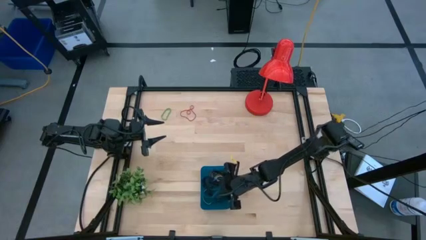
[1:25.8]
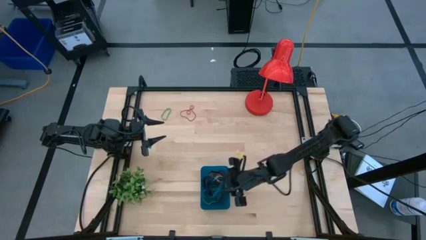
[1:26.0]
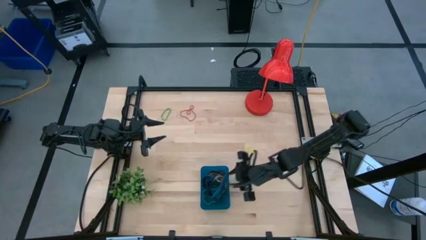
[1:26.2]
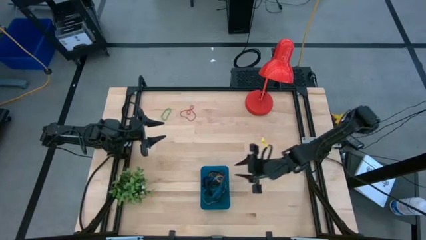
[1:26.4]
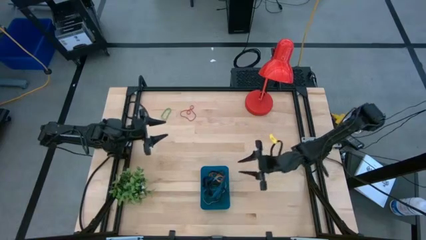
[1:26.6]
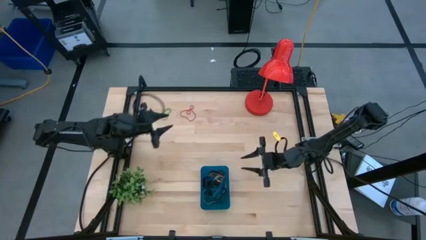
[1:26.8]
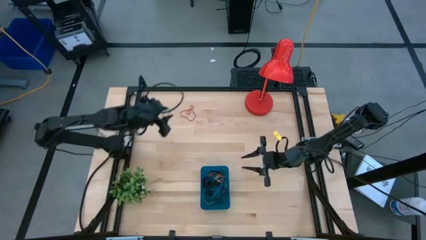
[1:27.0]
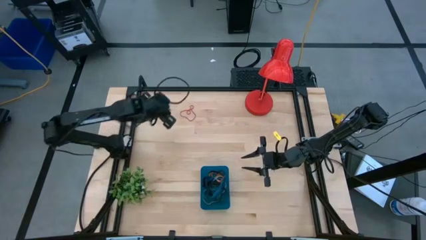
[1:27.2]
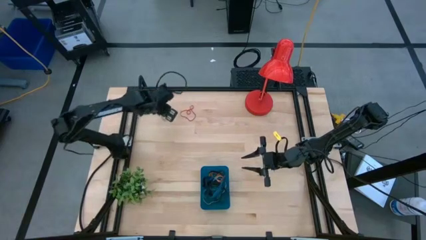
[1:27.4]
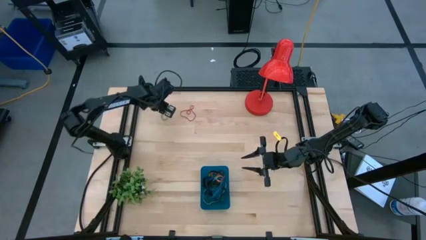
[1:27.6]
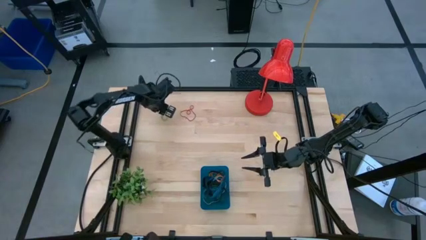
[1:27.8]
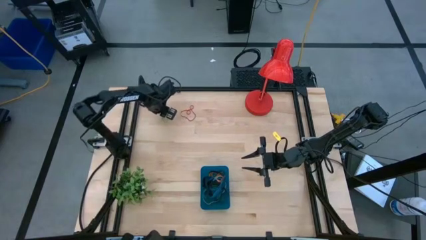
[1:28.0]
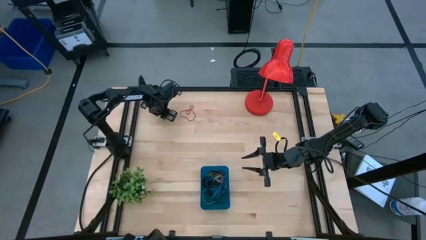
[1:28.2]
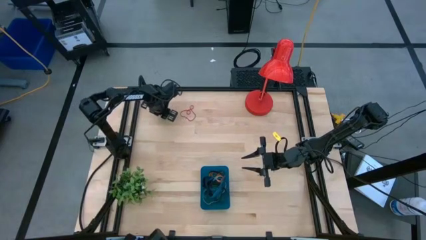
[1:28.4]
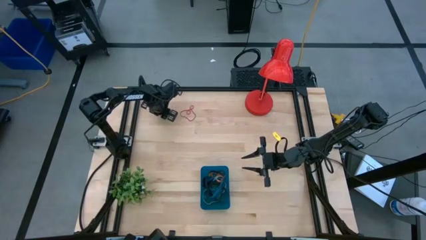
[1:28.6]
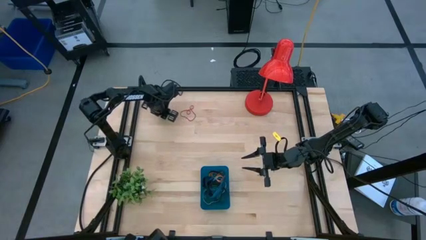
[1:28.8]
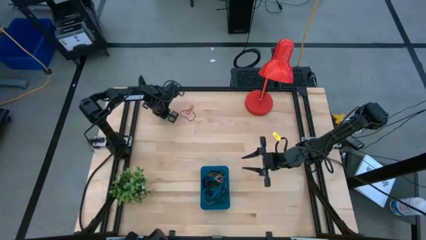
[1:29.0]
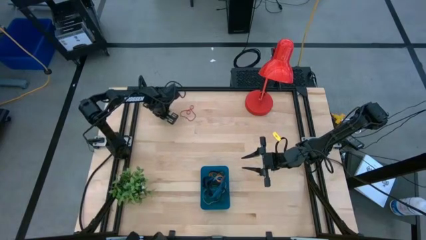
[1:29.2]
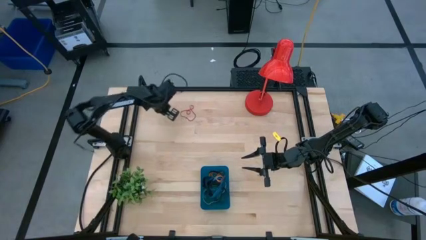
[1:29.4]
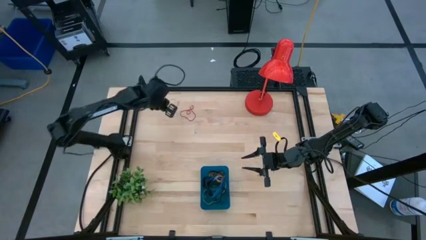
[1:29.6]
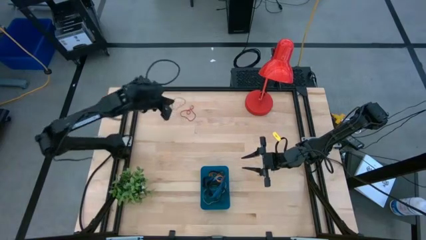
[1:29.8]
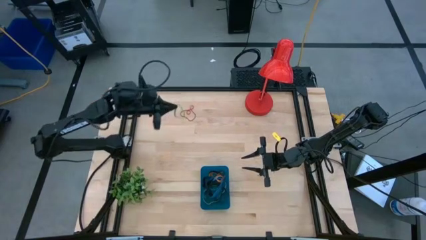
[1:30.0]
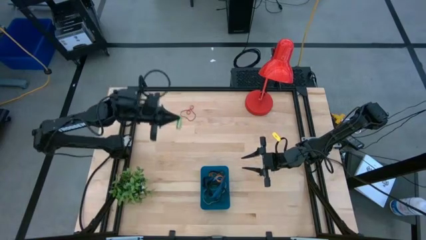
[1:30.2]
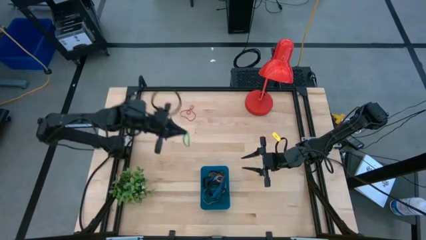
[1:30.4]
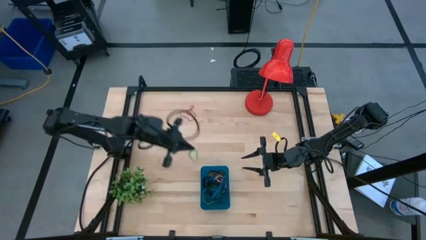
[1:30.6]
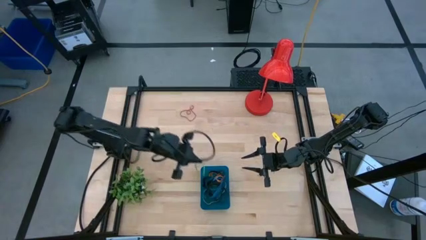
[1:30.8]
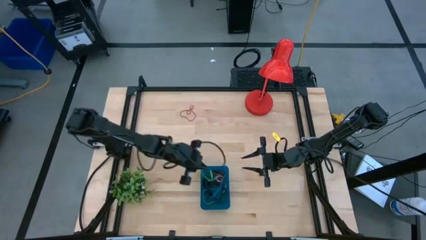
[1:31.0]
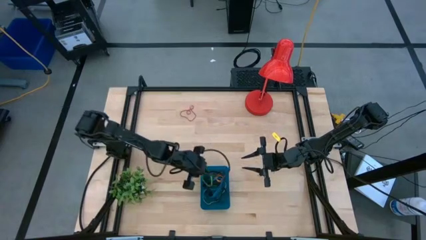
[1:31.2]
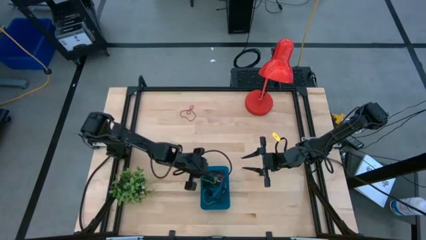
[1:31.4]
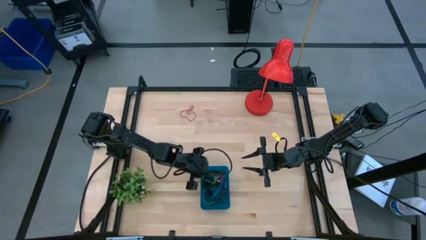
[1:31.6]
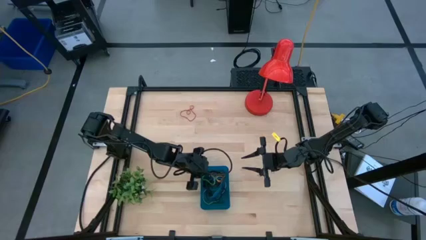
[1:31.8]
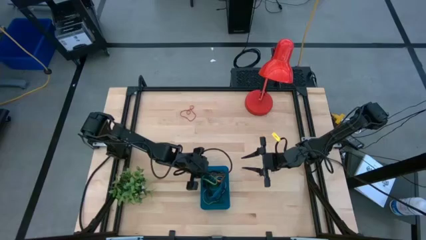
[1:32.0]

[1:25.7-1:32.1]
Task: Pick and place rubber bands into bin
Put the green rubber band into the blue bin

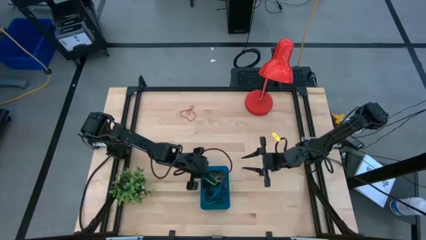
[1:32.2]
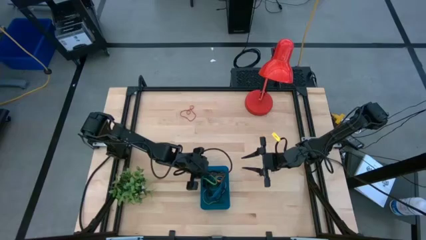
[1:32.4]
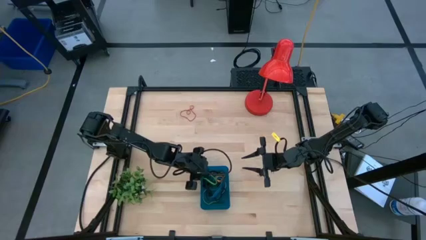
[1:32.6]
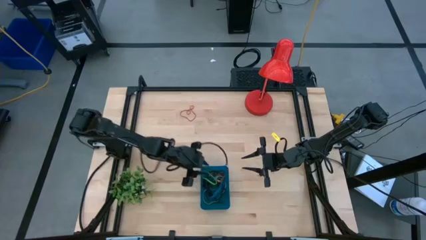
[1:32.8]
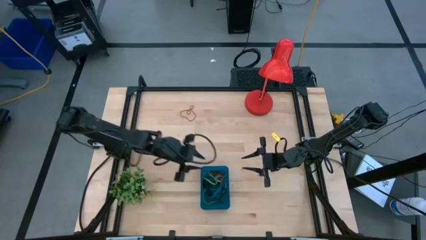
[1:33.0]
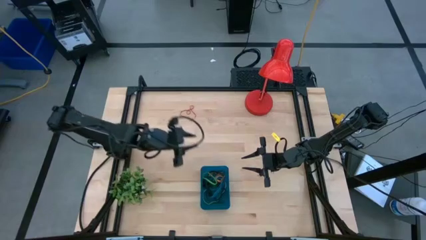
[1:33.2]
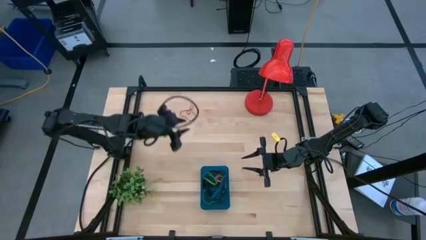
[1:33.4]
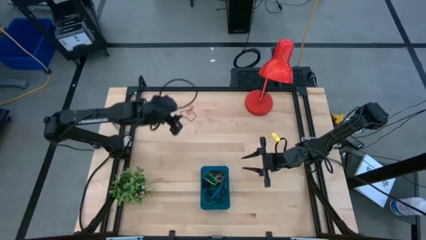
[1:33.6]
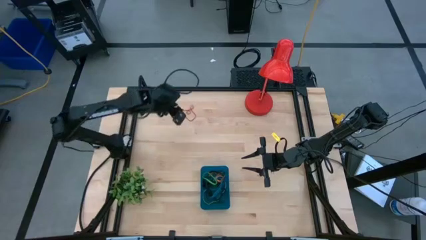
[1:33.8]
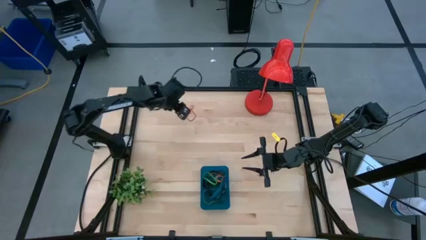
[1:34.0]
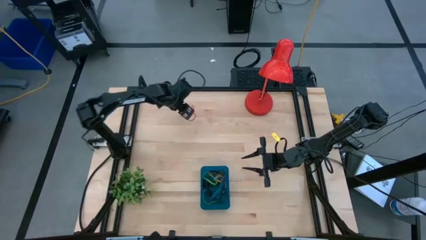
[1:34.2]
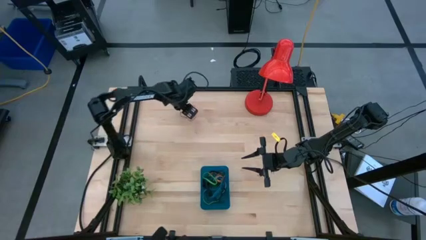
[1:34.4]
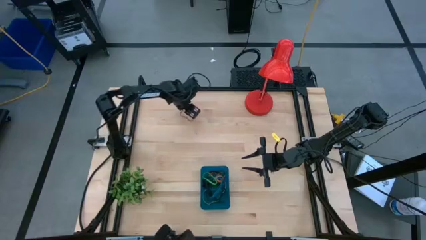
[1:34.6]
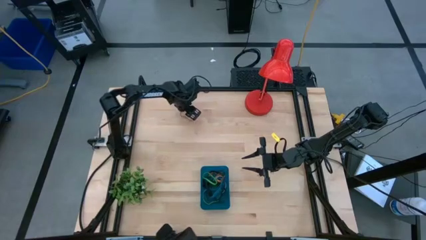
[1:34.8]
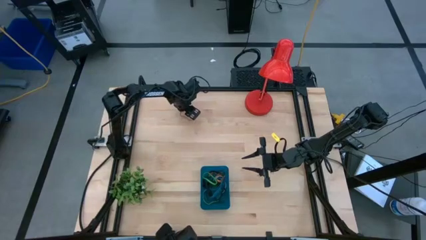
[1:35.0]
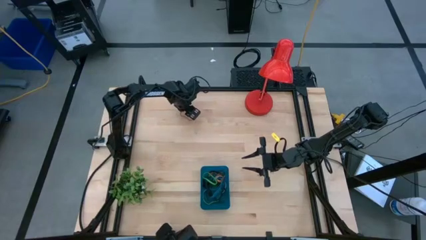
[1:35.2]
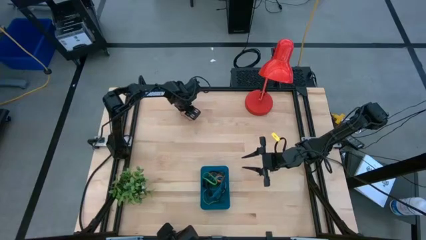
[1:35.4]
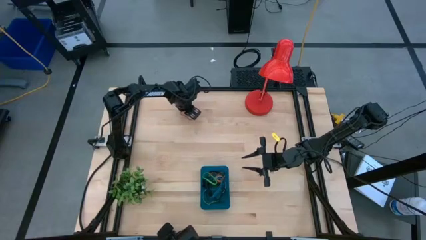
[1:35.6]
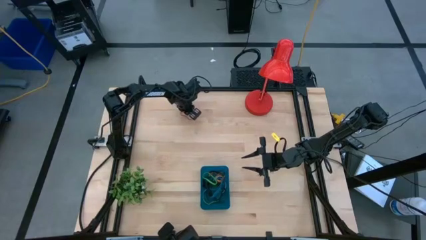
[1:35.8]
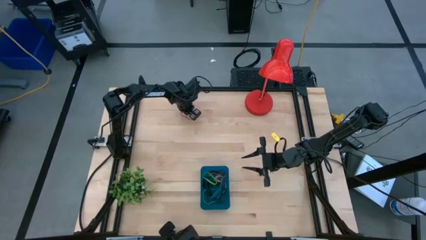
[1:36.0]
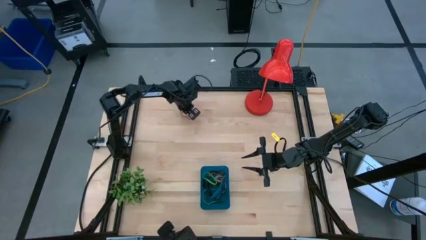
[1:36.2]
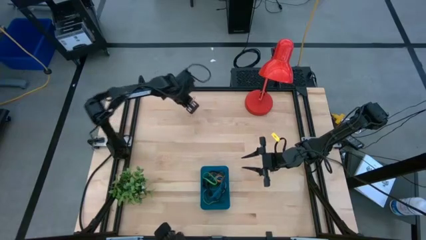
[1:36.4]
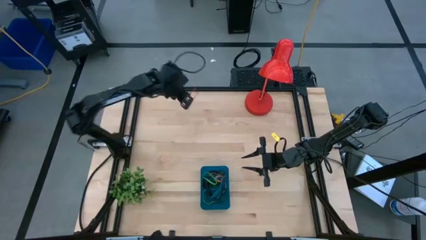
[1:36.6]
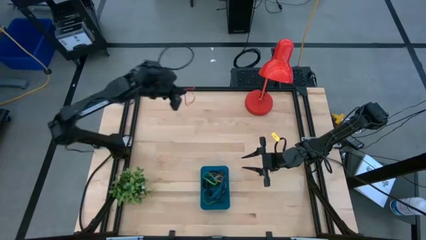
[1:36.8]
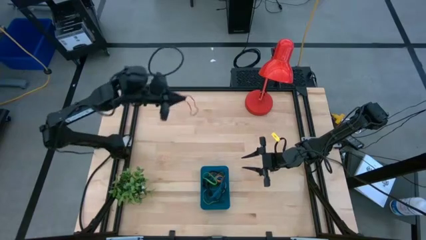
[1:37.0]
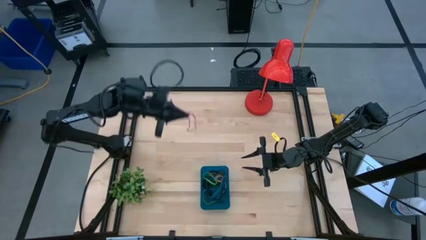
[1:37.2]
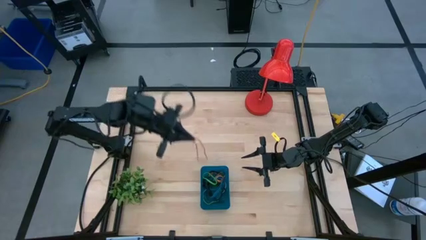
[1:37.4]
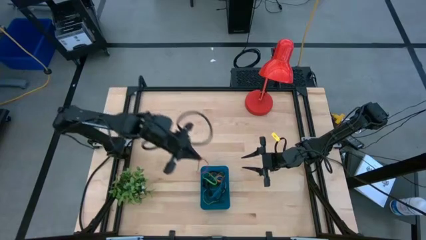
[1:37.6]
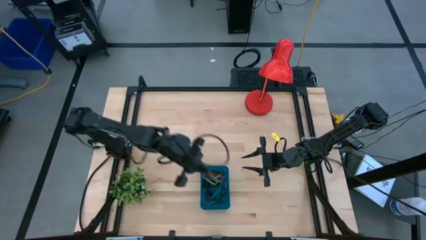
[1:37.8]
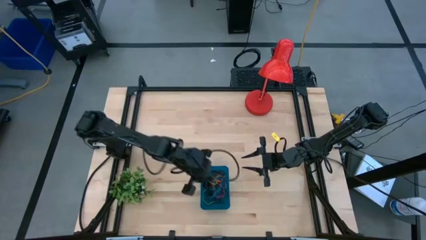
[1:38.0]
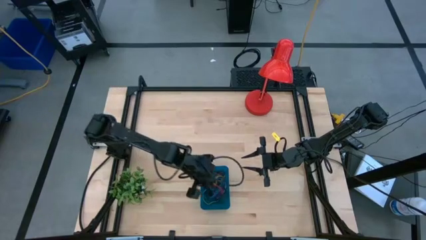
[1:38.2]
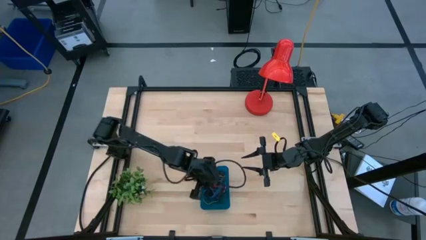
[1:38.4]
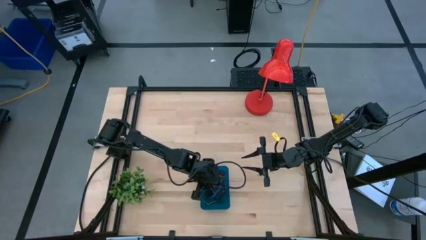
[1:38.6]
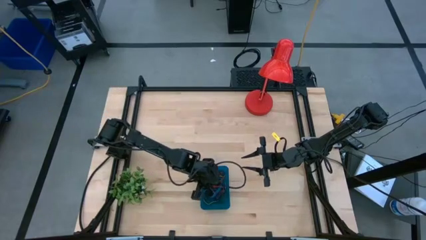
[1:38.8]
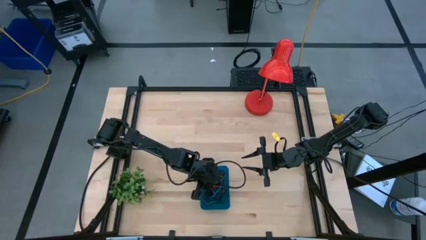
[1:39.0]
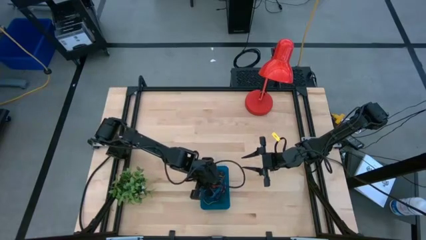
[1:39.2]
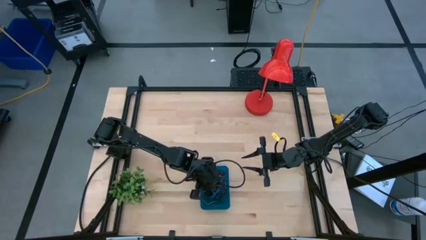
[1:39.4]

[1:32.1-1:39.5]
Put the red rubber band into the blue bin

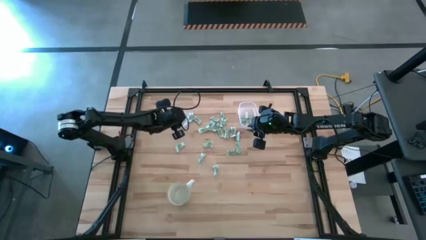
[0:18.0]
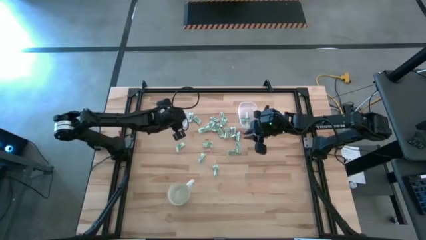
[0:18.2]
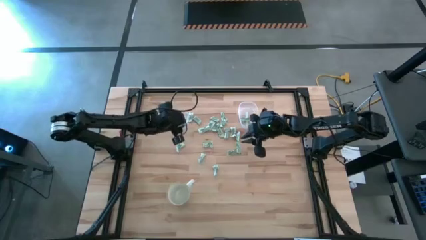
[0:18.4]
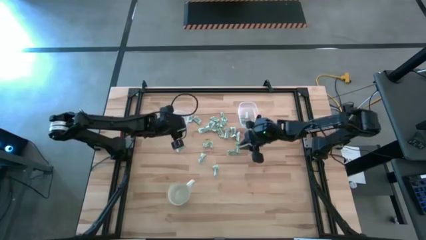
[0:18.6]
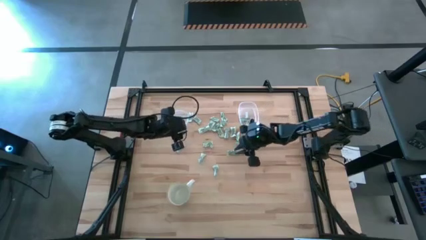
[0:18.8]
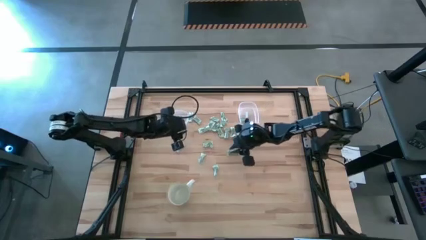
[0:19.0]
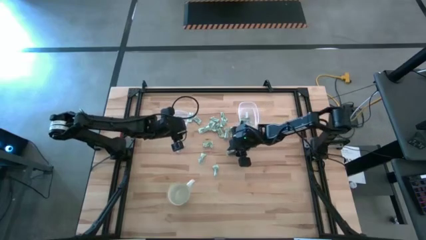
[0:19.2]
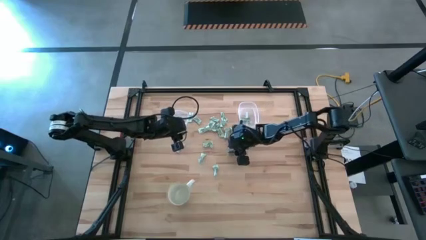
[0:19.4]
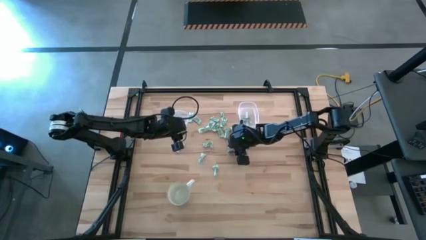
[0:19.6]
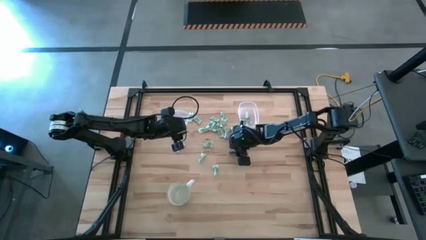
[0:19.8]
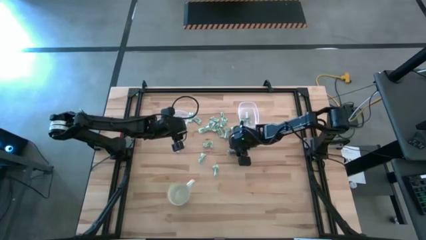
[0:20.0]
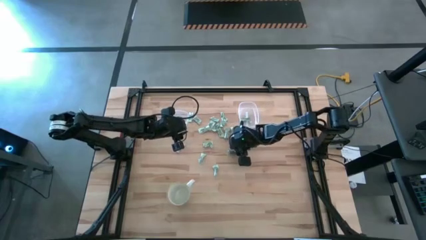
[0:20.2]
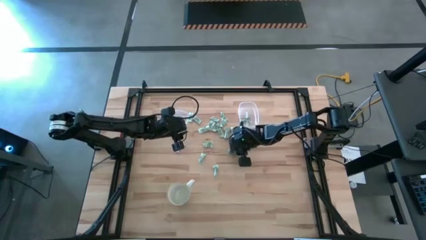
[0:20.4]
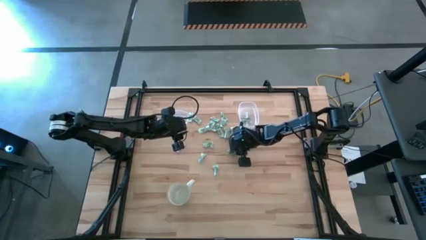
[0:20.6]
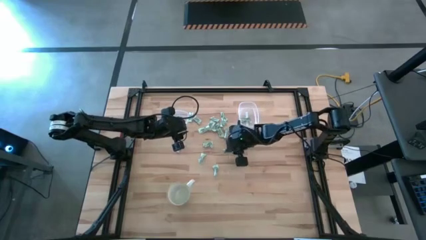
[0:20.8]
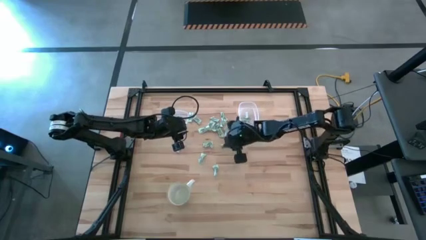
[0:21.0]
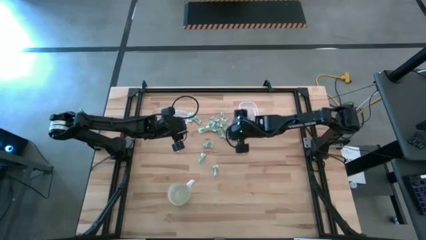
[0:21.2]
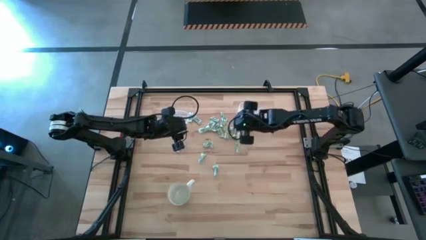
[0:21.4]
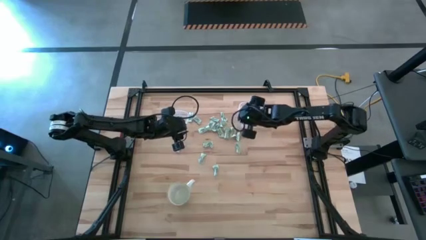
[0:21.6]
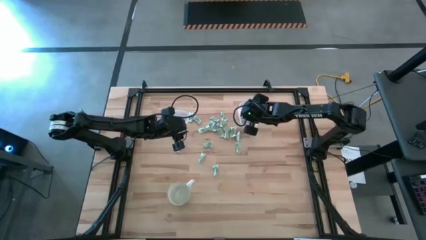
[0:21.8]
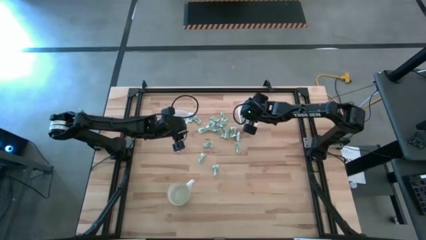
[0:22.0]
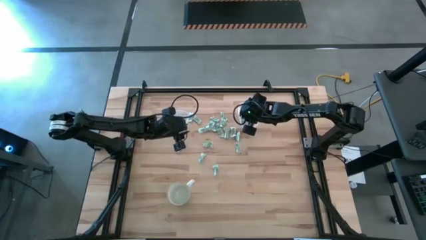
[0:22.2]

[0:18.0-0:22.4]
Task: Pick and place items into bin
Put the green stevia packet into the rectangular transparent bin
